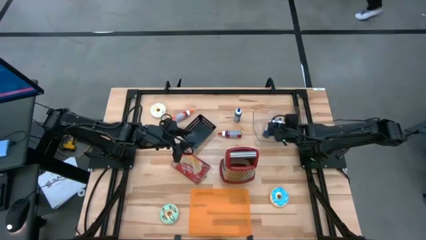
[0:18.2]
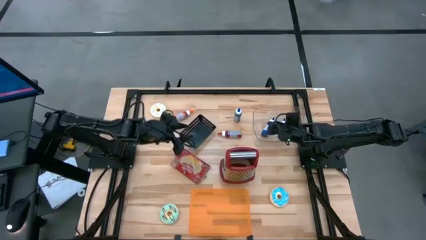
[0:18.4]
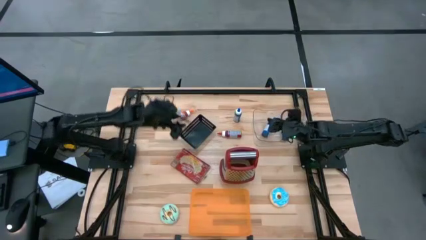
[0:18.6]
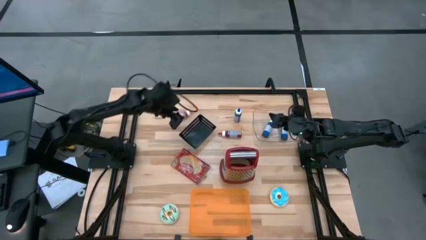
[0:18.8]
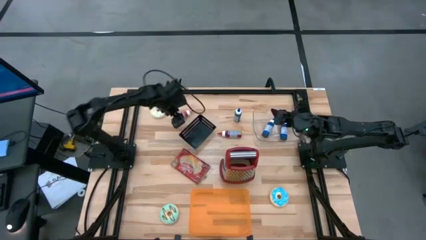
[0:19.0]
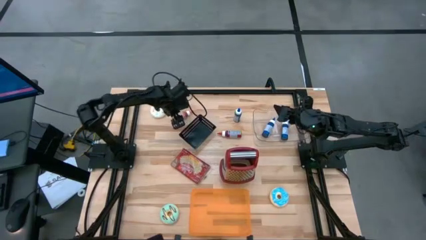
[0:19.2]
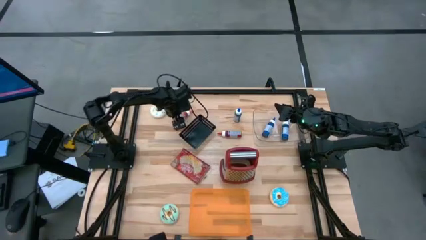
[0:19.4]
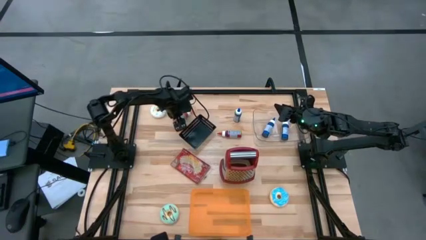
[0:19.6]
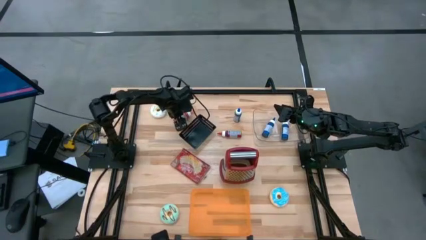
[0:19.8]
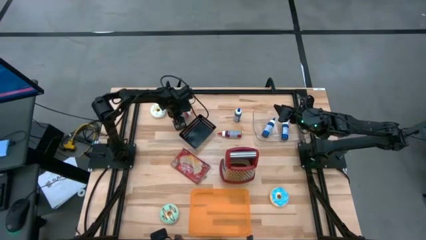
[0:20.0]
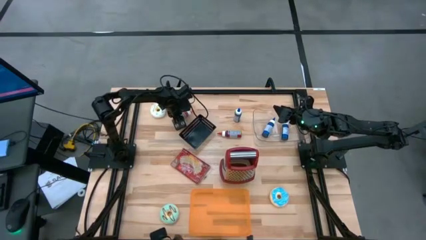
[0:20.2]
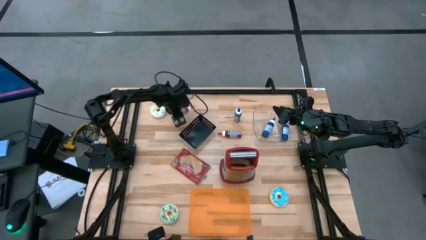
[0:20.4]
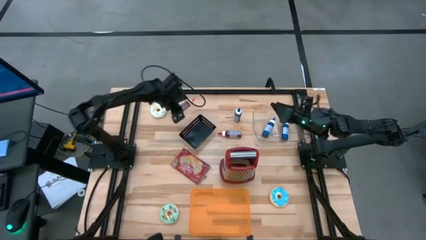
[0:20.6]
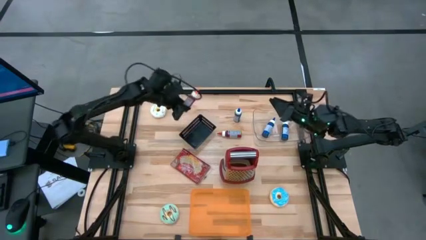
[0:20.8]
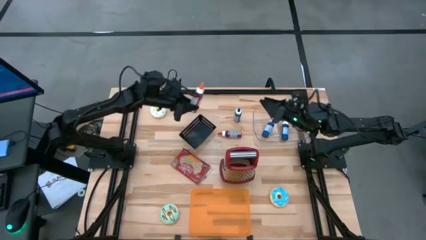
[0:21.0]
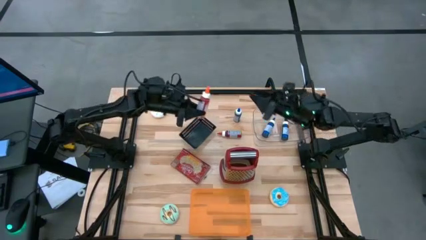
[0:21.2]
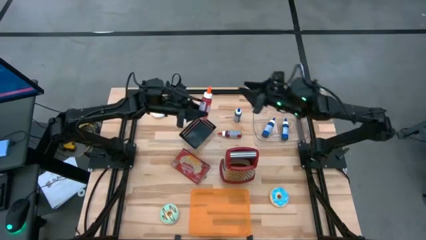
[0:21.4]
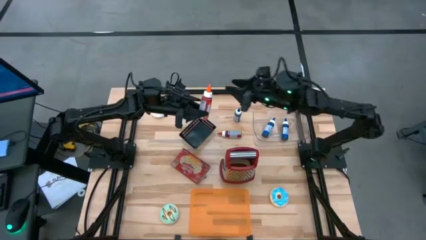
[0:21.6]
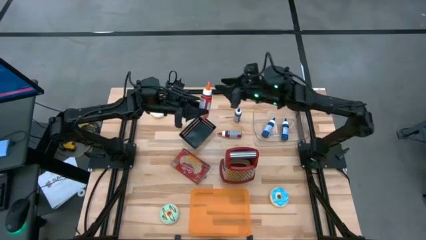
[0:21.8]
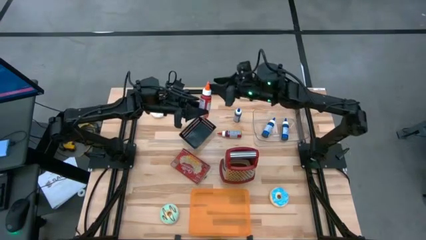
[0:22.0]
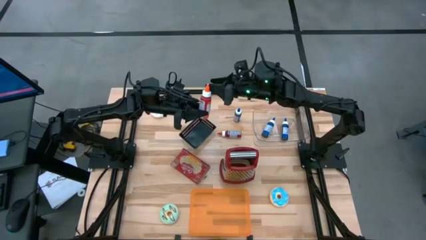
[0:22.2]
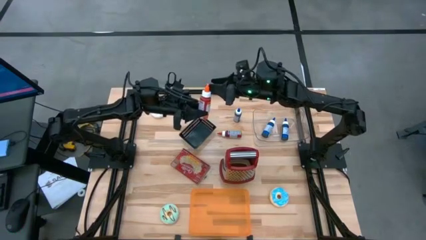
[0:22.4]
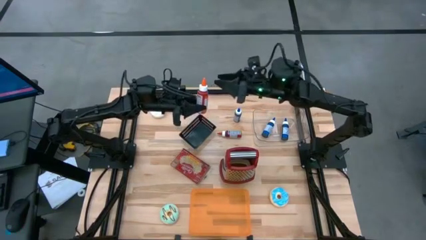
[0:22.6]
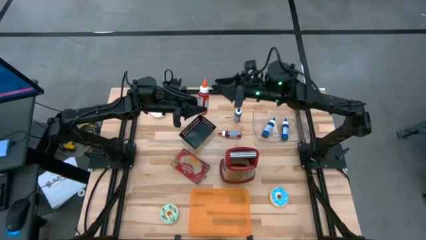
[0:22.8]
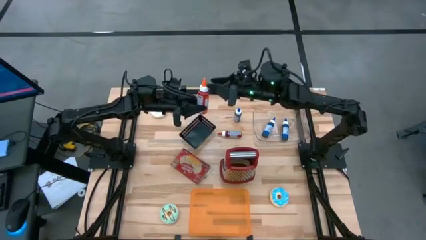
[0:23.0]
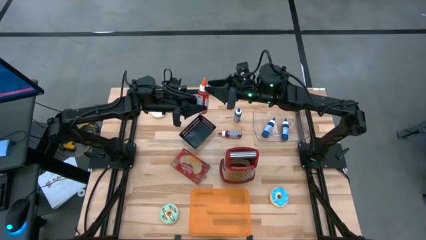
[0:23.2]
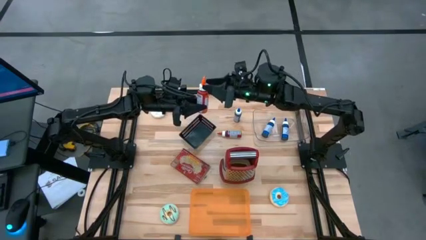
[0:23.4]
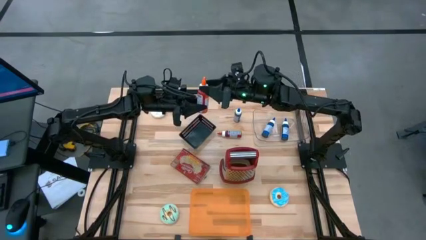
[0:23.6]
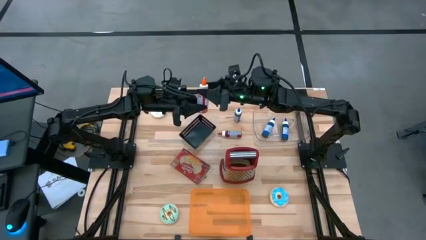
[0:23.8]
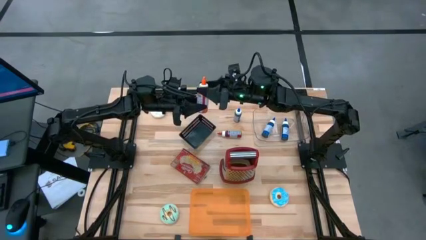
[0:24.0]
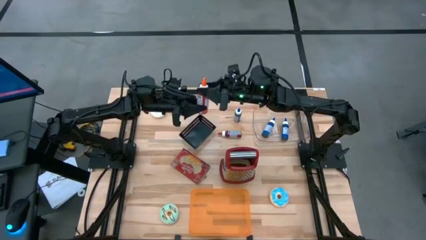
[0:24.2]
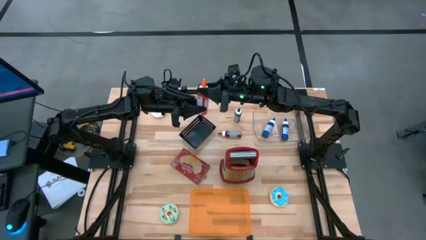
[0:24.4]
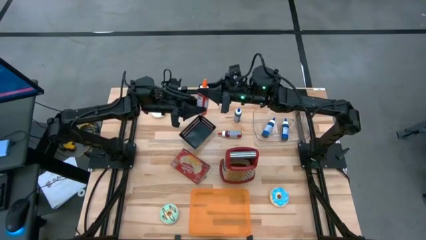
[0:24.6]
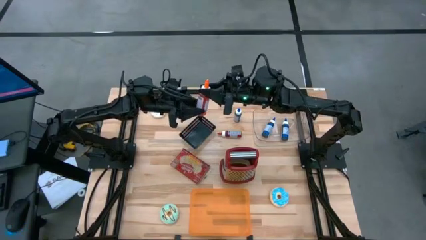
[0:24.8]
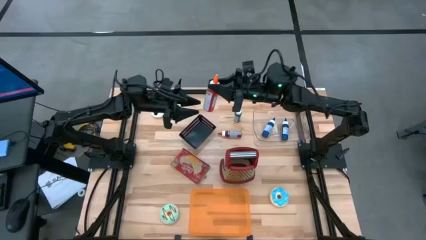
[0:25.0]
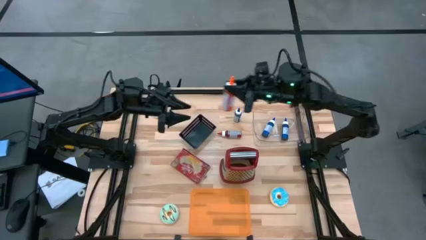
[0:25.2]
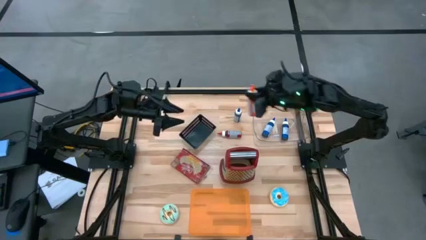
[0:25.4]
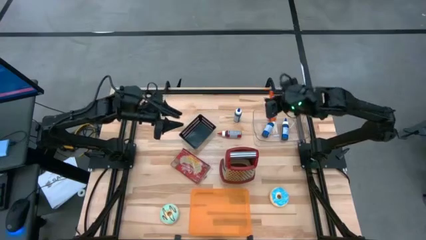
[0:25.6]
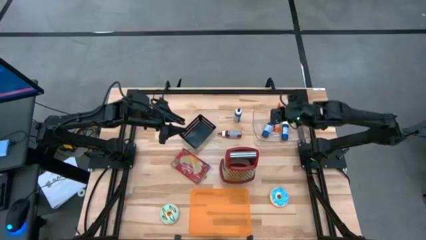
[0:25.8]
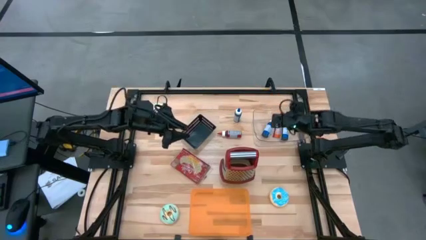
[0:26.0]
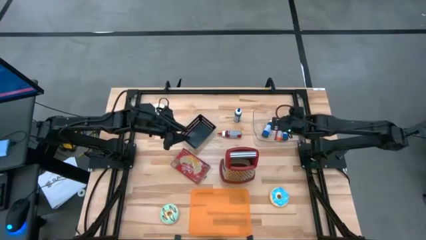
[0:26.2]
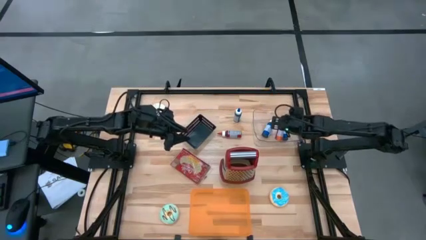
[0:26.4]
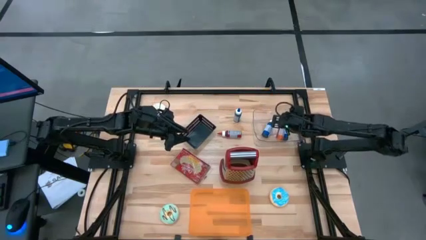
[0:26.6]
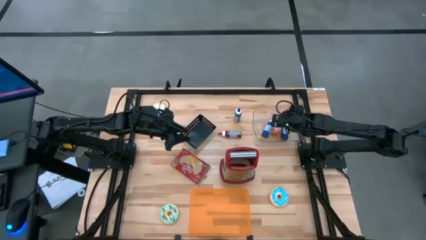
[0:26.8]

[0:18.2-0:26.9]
Put the orange food coloring bottle into the transparent bin

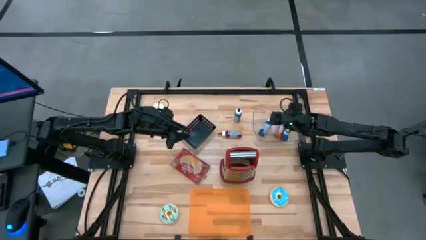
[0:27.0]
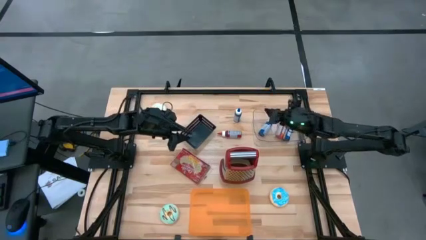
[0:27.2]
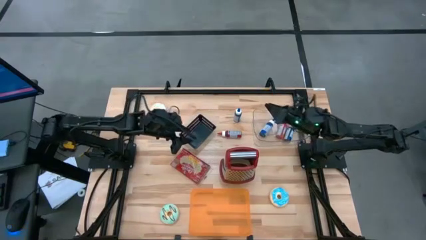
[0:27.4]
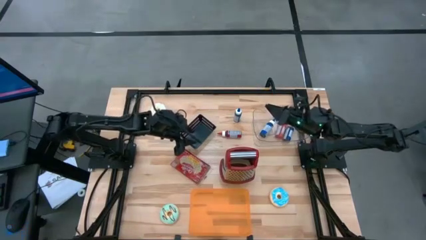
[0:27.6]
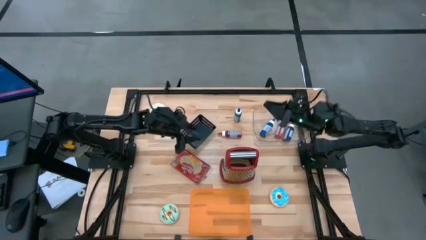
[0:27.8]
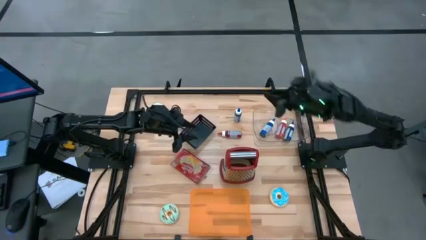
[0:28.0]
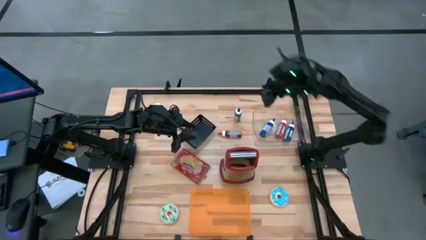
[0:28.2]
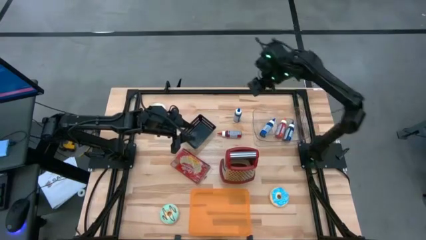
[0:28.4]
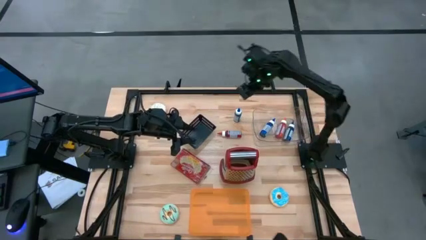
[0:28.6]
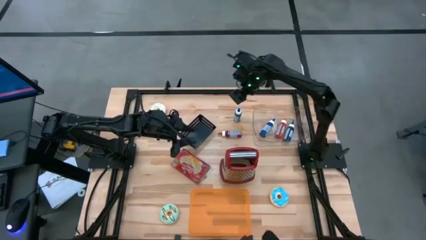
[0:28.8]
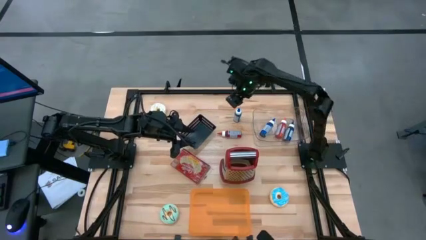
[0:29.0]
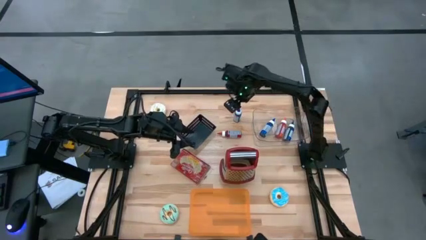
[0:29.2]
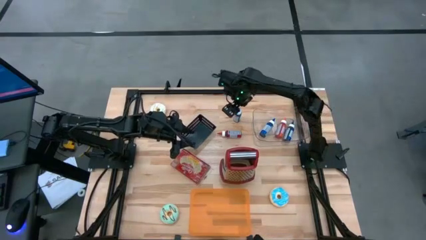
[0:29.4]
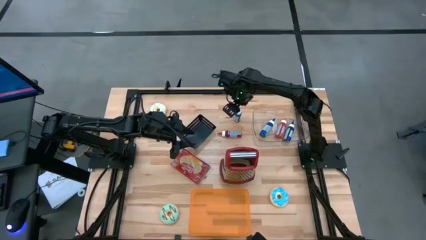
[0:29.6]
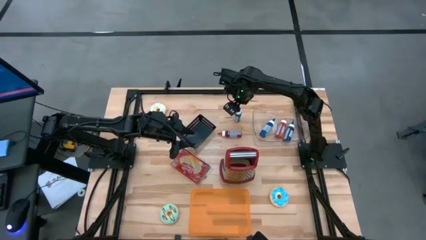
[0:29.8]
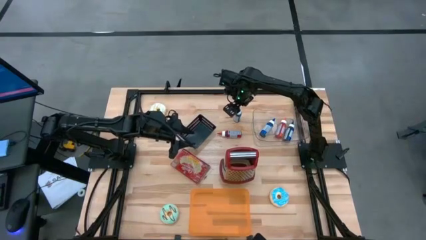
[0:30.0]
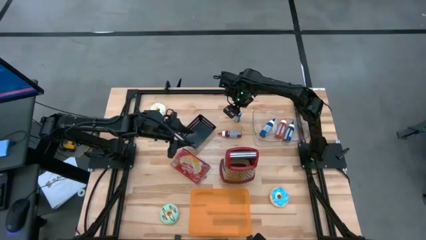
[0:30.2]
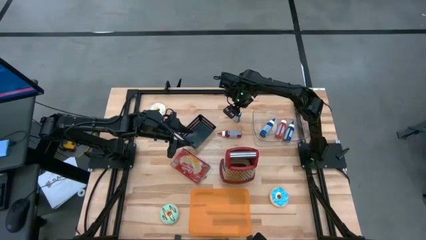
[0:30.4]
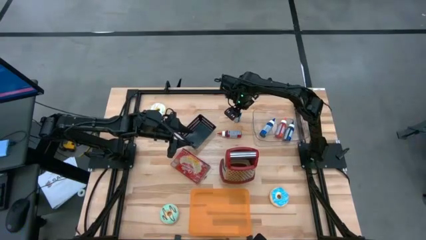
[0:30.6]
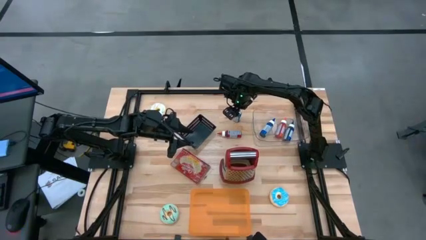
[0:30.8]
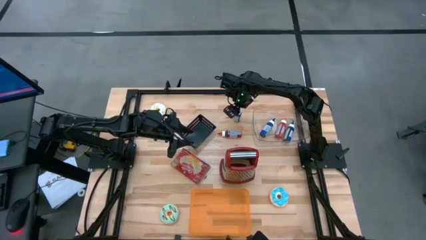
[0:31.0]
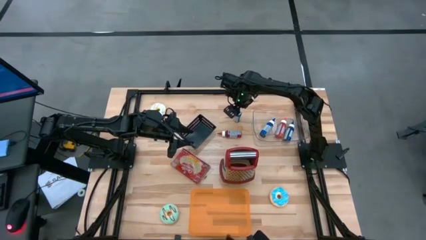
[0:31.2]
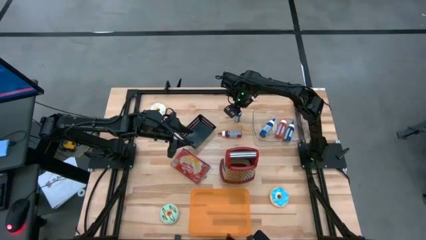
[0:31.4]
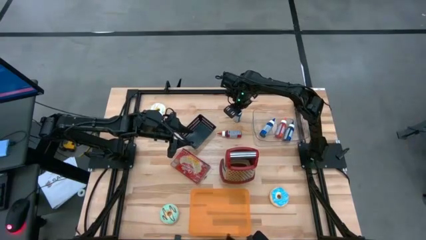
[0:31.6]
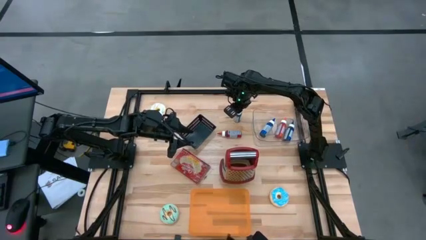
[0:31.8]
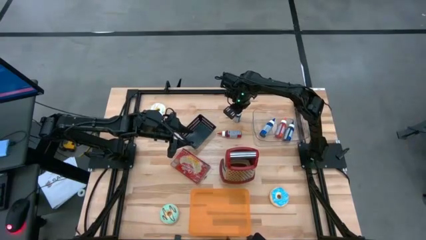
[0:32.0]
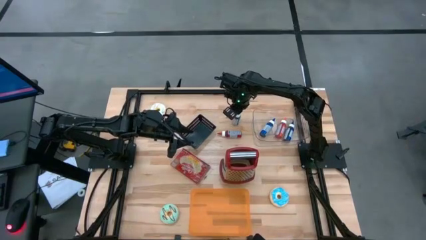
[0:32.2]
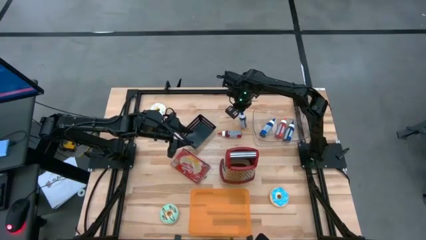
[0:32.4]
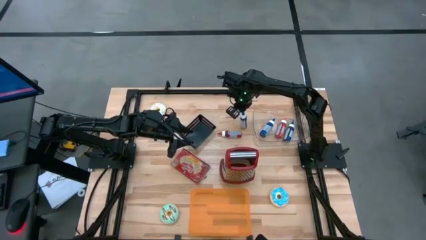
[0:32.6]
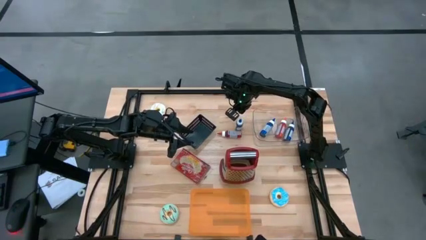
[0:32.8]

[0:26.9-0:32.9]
Put the blue food coloring bottle into the transparent bin
